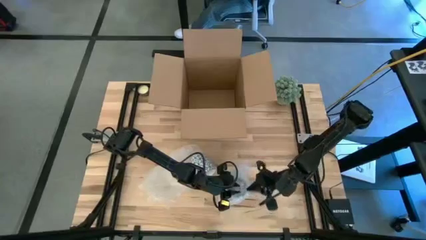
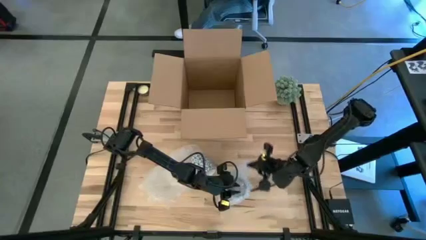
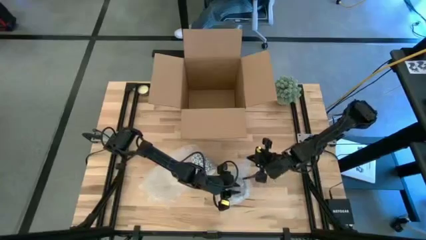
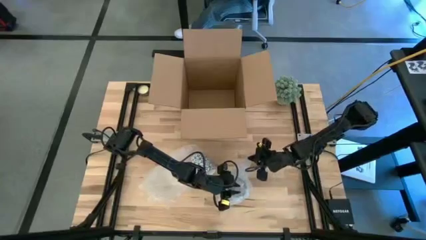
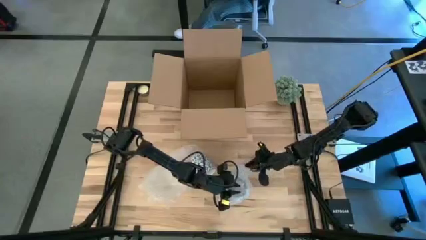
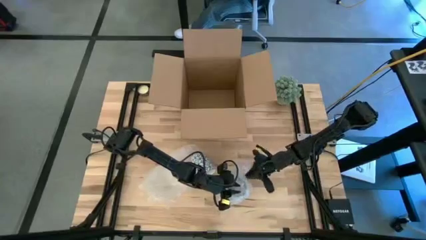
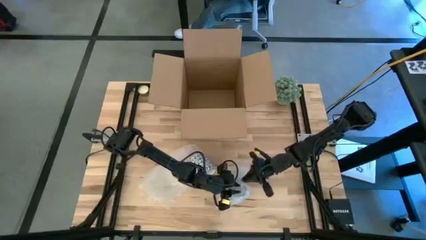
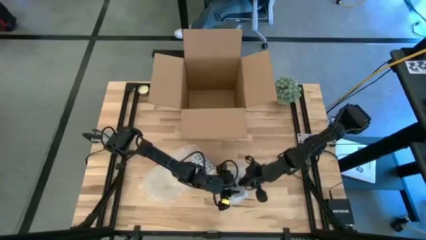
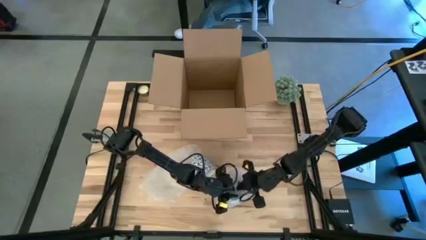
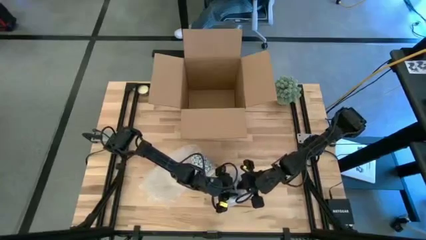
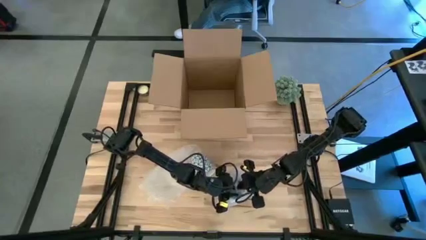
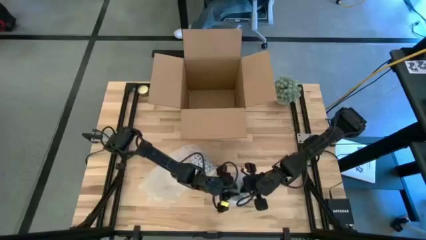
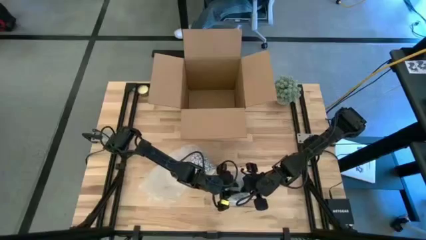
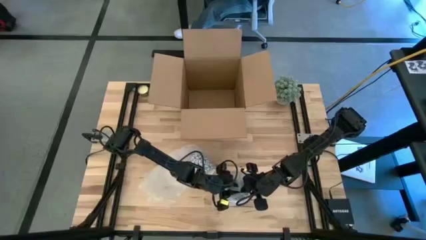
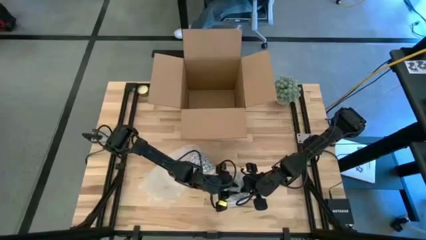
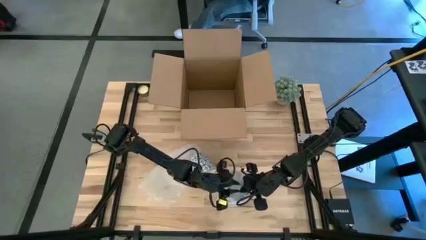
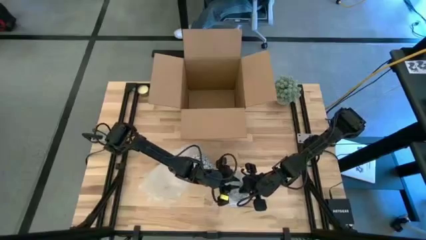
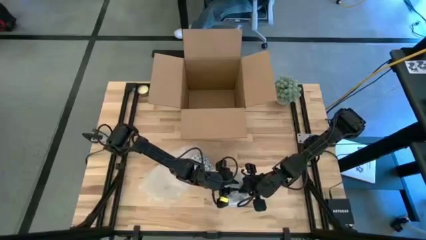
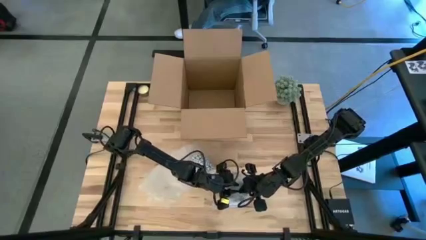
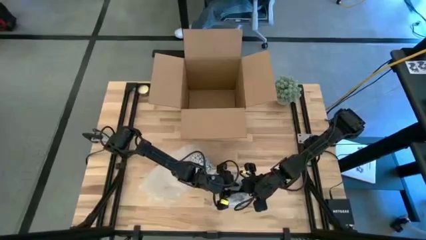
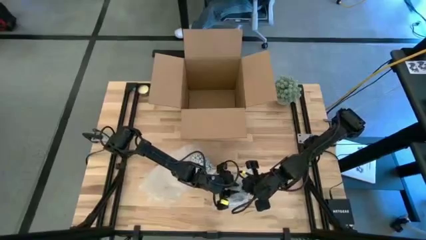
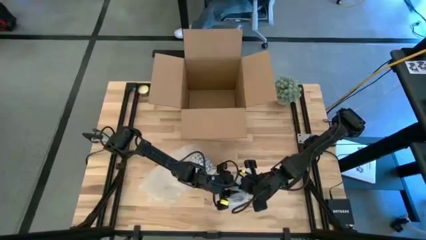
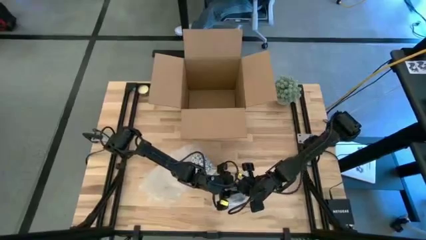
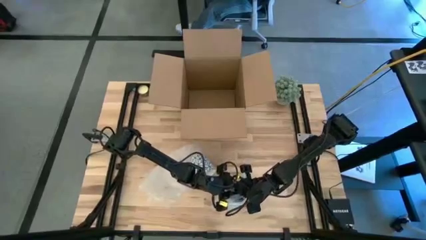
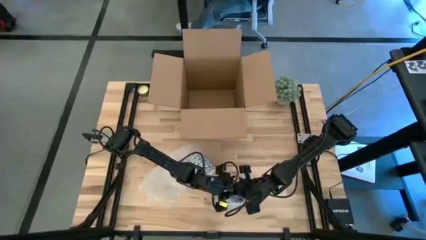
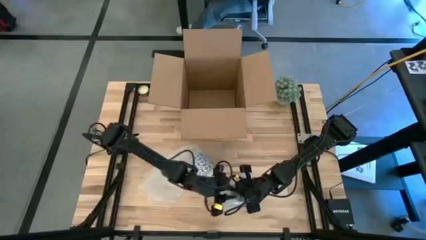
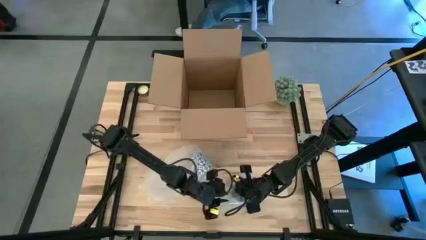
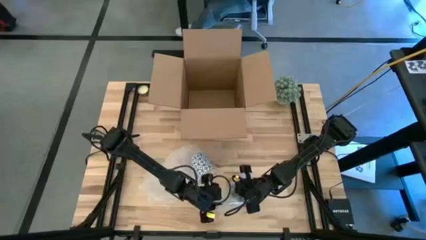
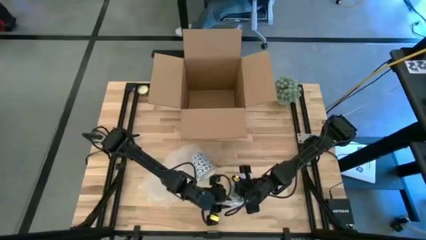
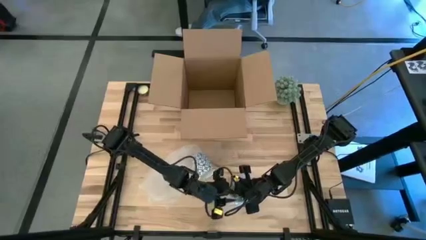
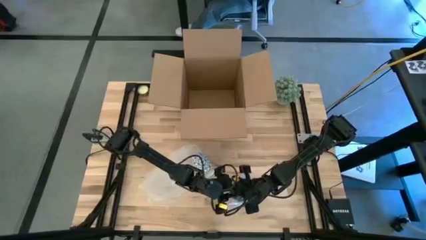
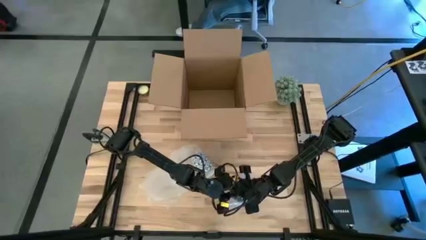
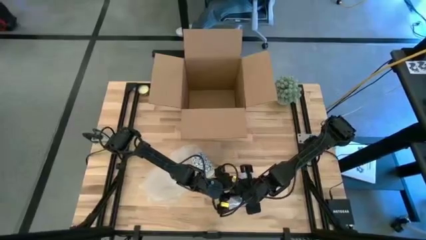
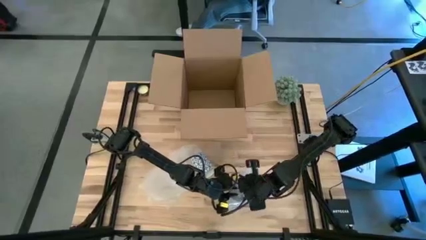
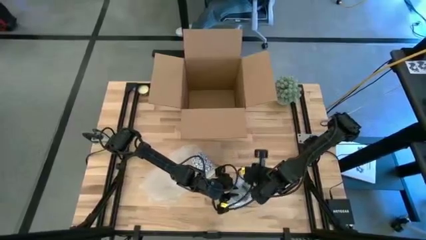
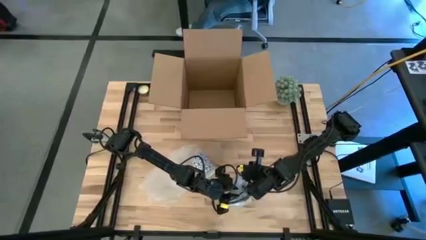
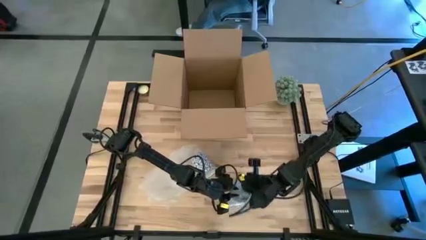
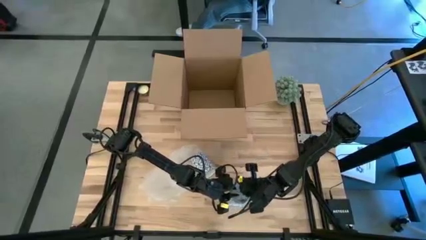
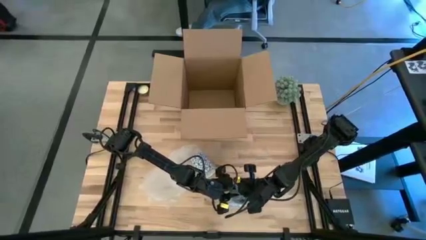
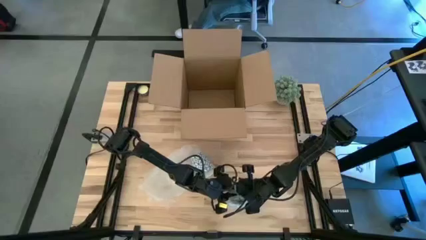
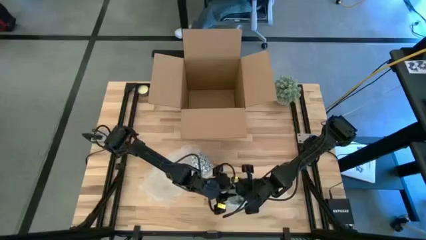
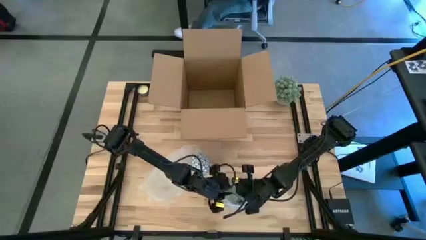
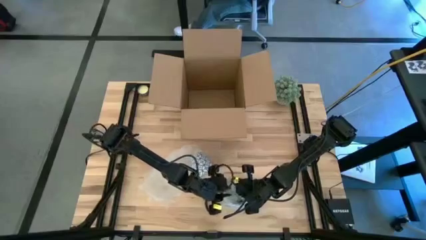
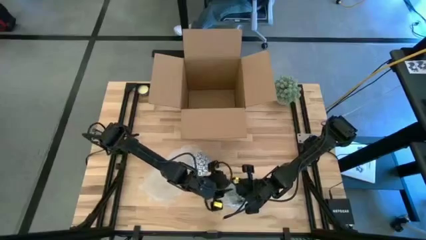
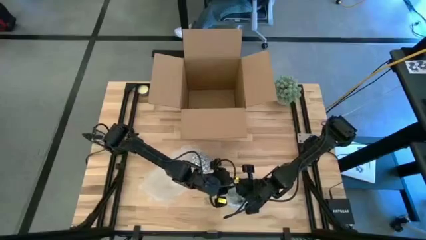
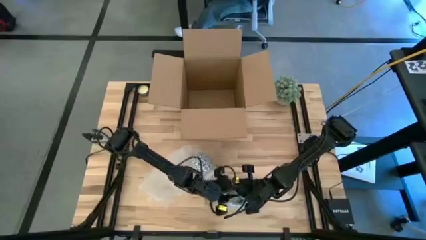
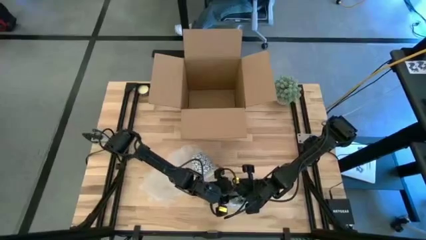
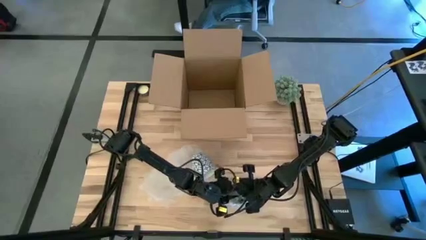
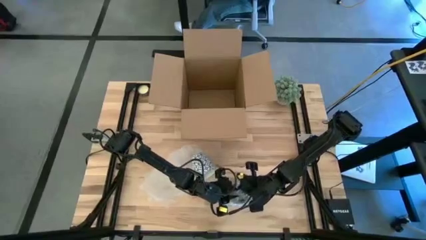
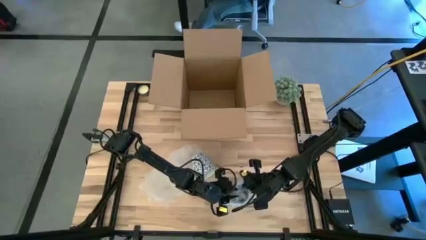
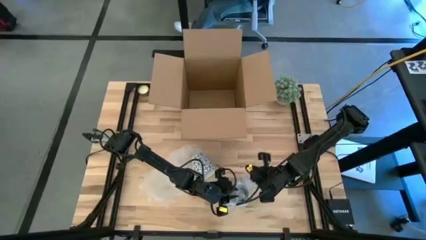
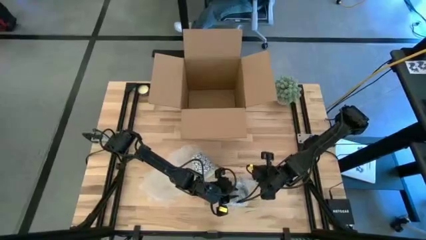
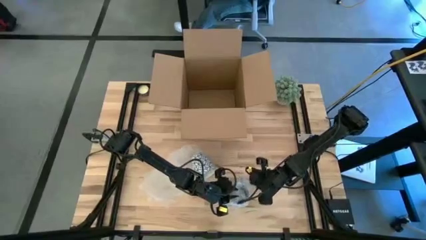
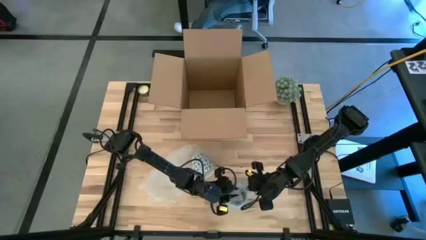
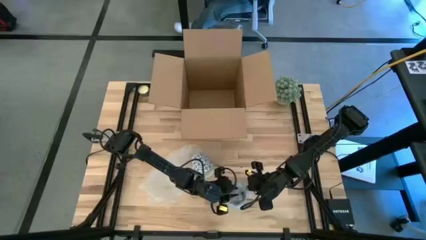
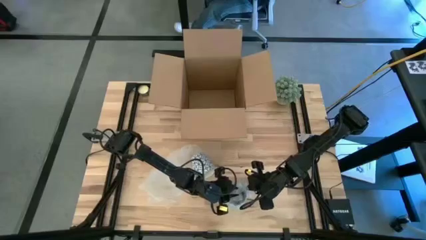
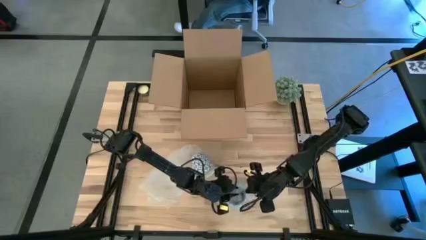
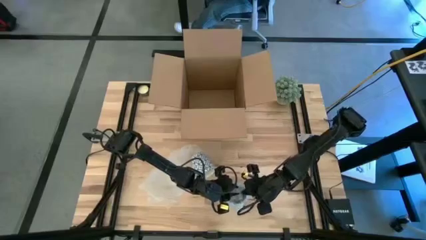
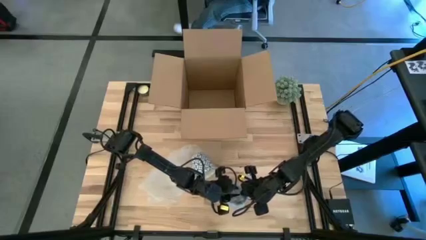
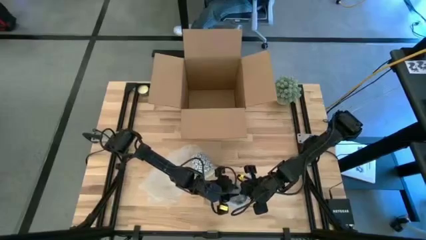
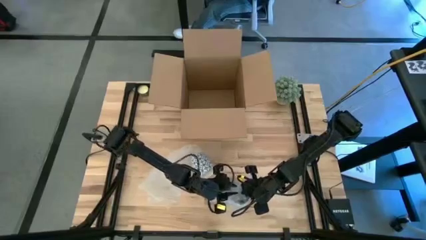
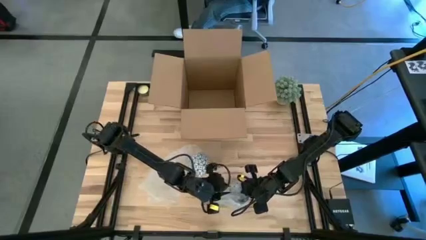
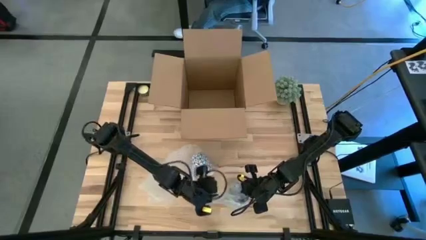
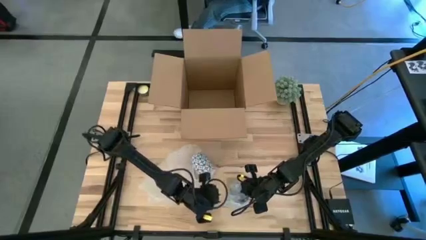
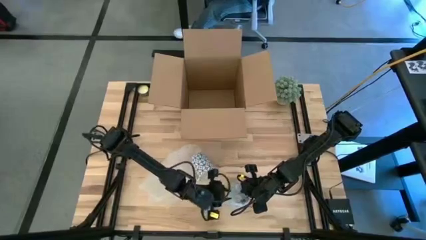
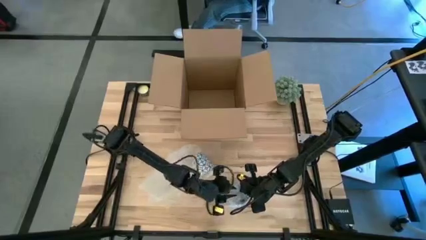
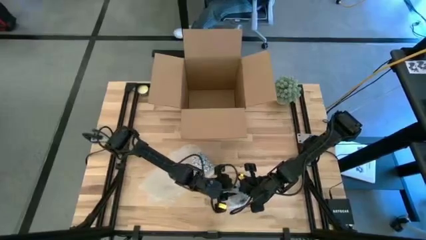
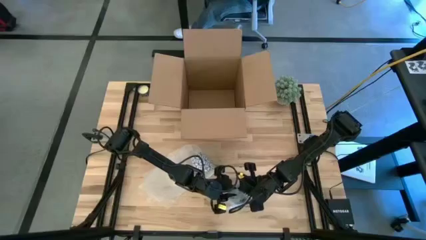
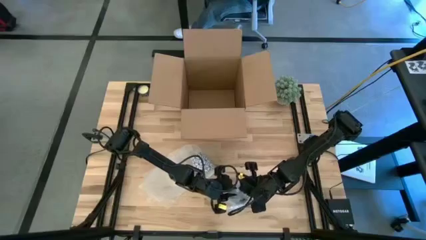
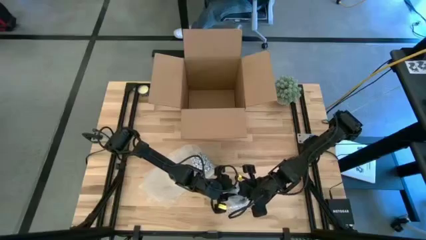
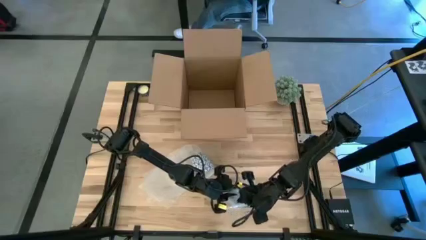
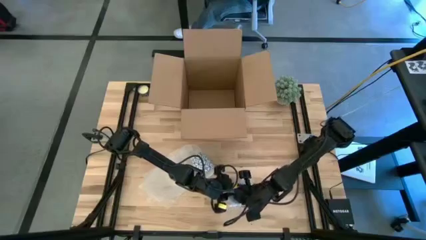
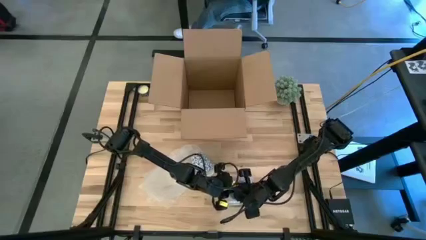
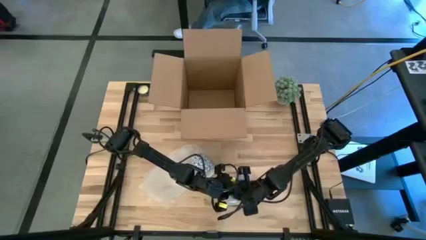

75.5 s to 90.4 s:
Task: wrap mug
Wrap the green mug with the right transparent bubble wrap

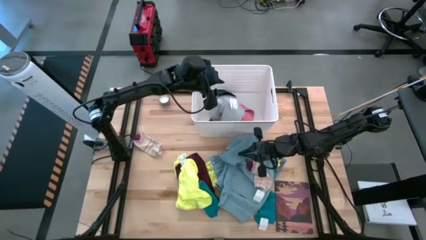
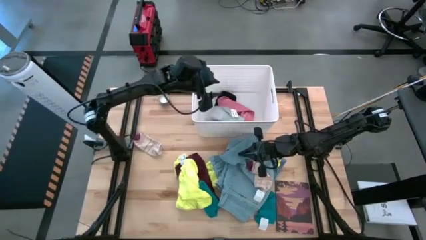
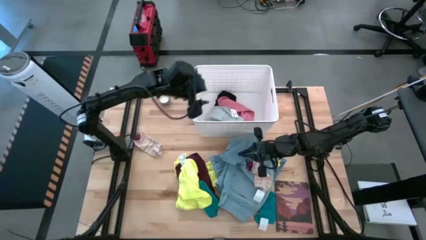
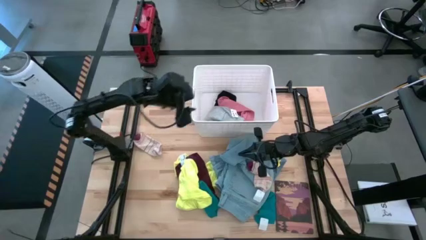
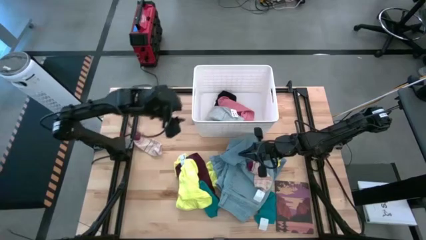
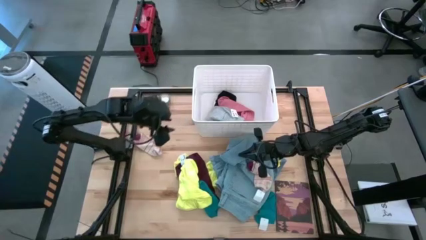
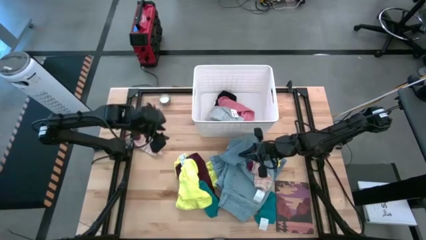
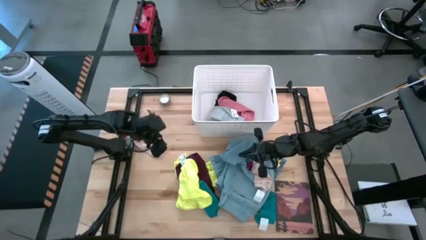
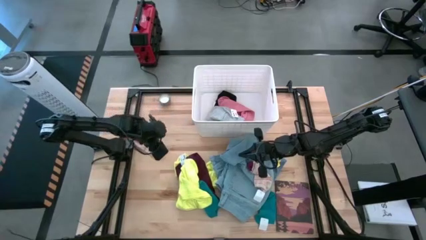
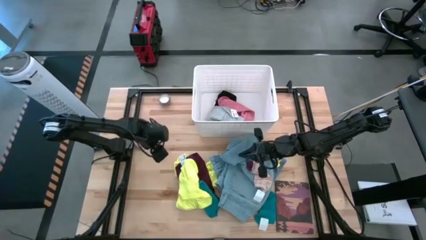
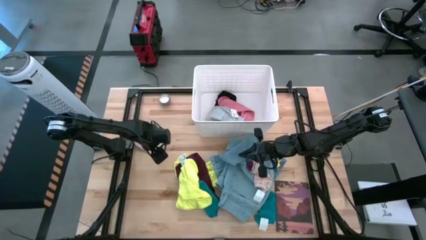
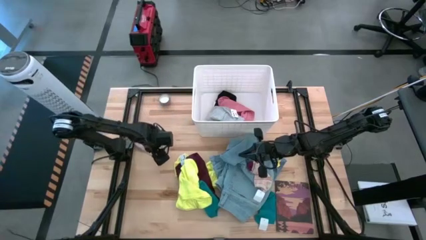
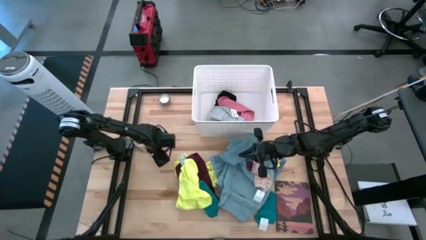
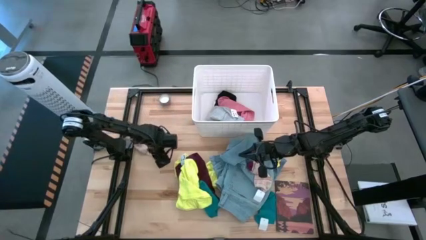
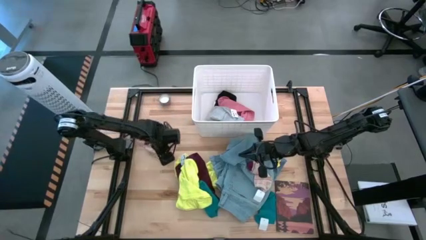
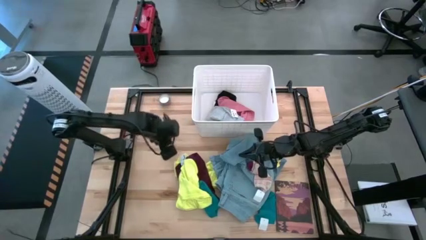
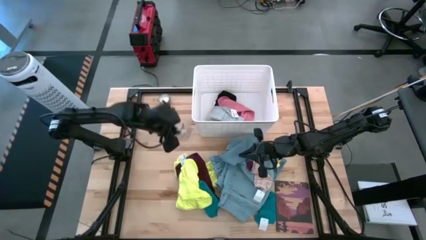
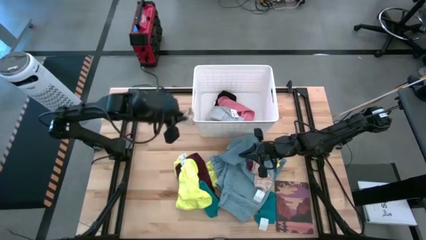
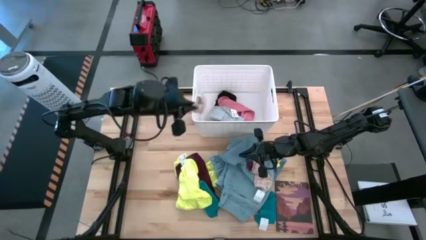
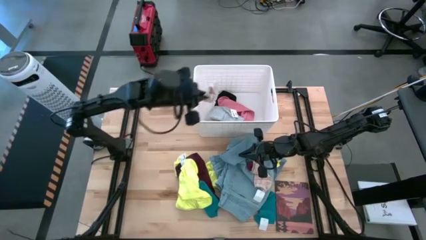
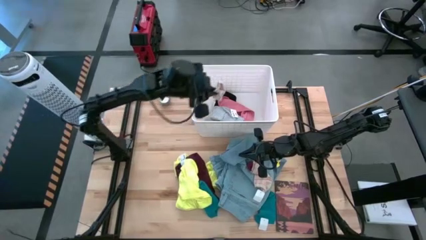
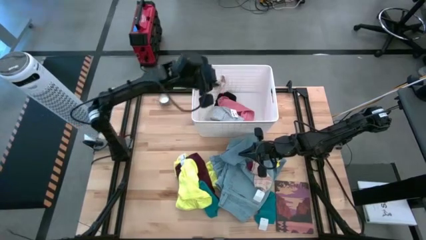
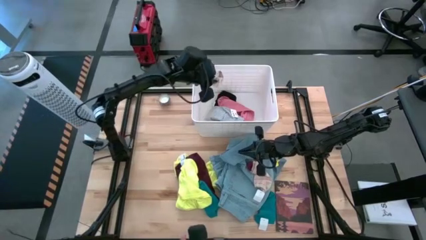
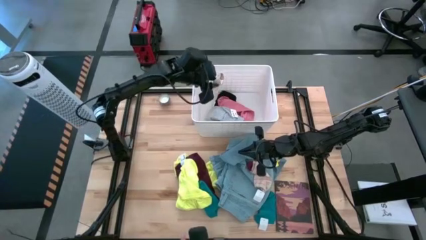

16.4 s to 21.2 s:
Task: Sort clothes
Put the top red striped sock into the white bin
